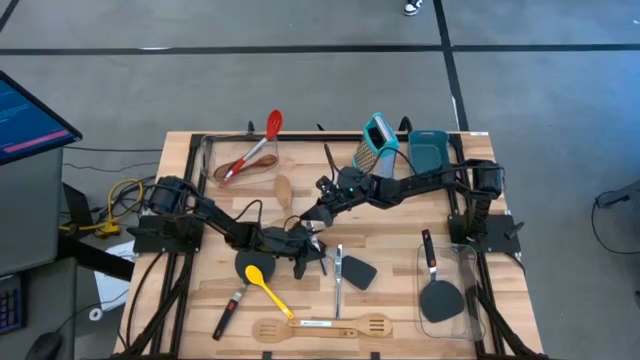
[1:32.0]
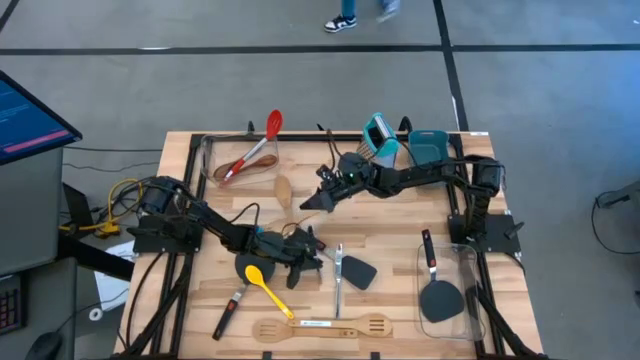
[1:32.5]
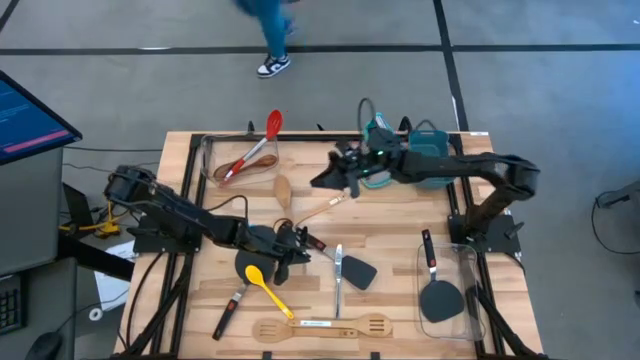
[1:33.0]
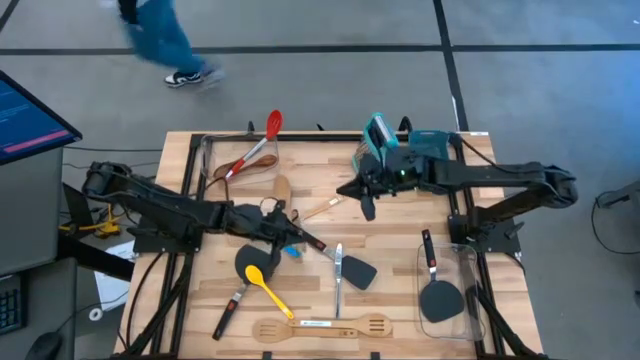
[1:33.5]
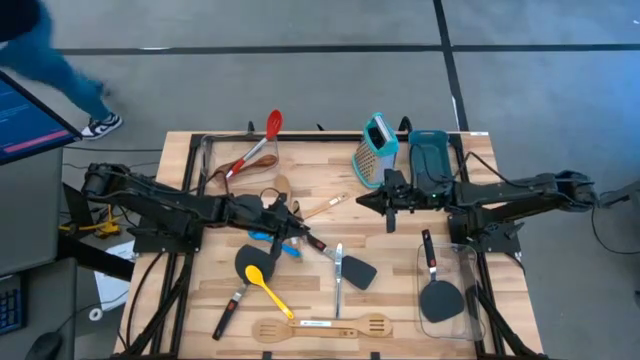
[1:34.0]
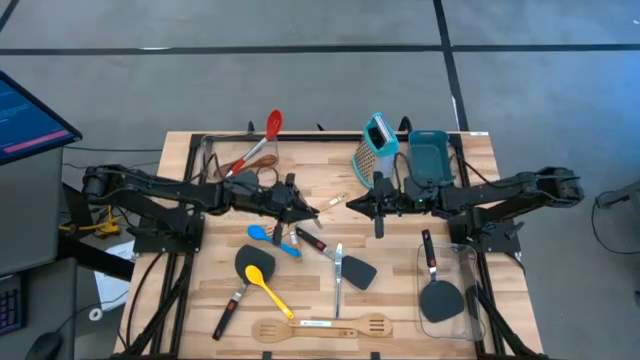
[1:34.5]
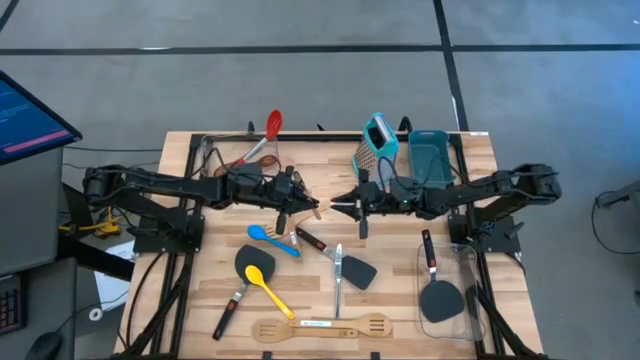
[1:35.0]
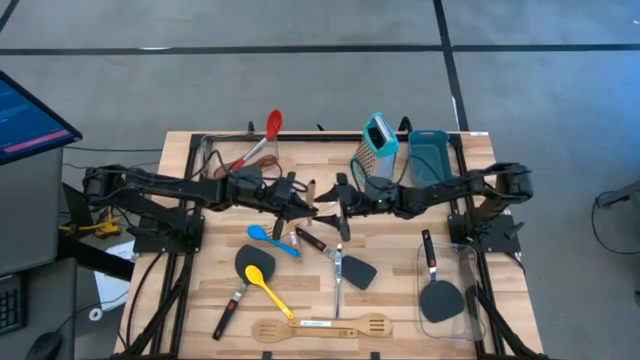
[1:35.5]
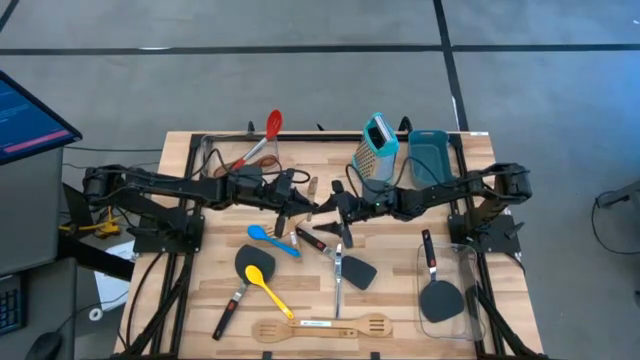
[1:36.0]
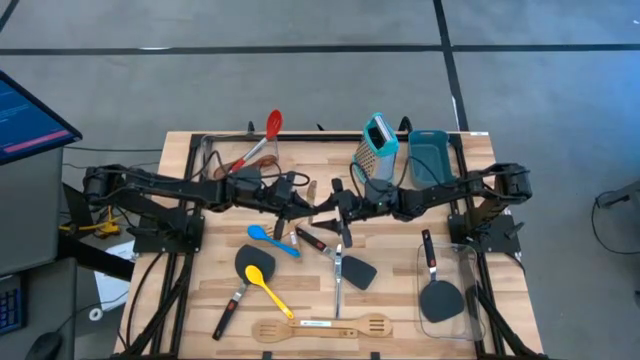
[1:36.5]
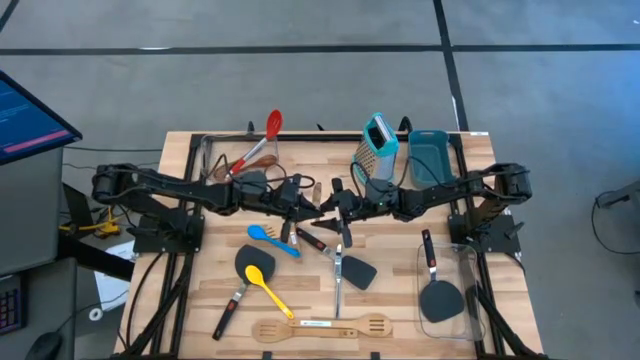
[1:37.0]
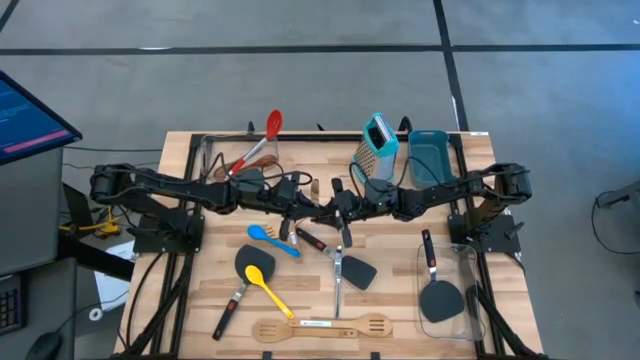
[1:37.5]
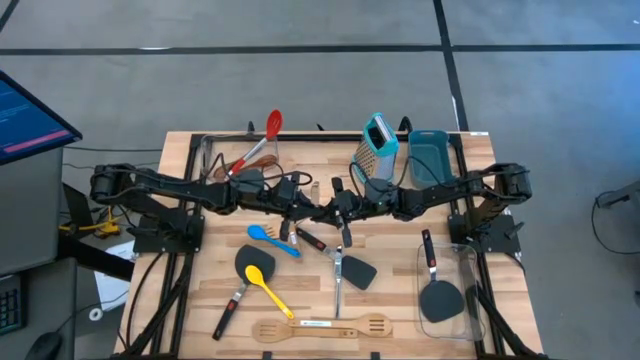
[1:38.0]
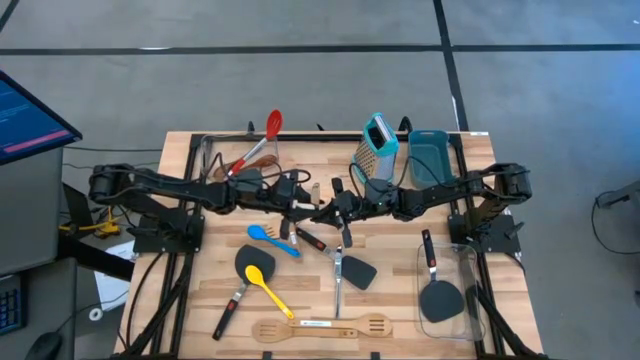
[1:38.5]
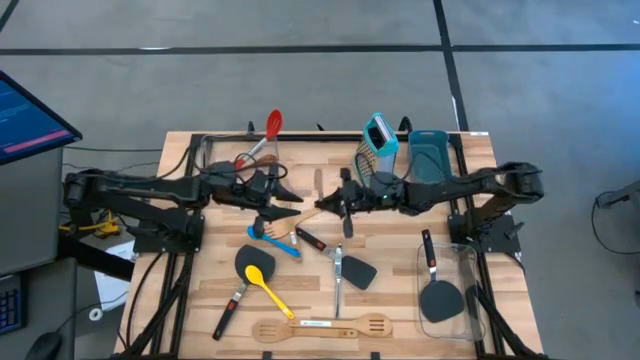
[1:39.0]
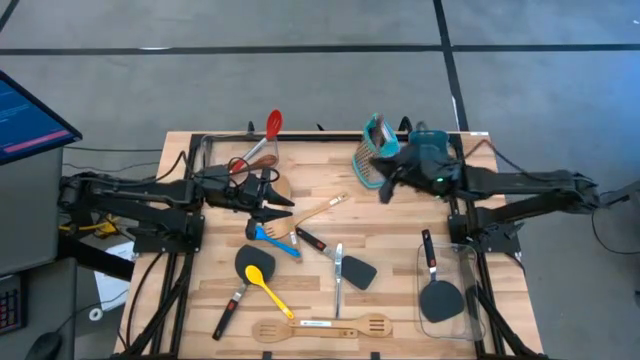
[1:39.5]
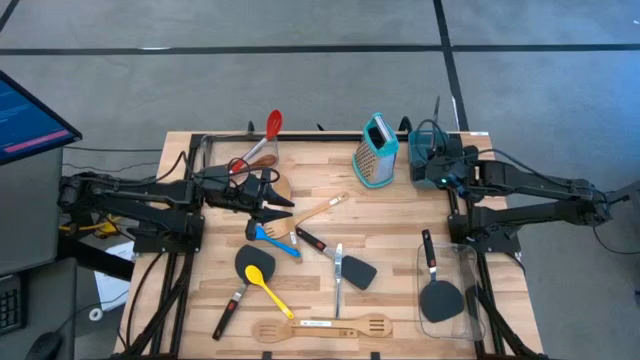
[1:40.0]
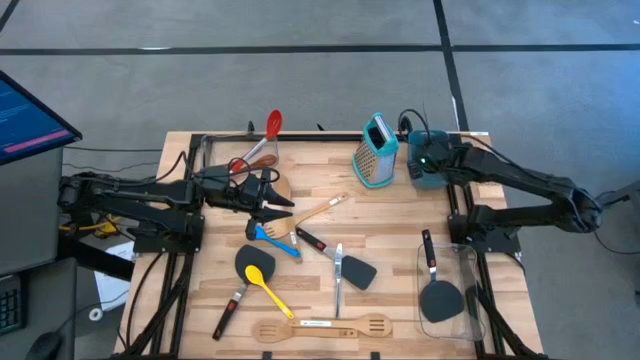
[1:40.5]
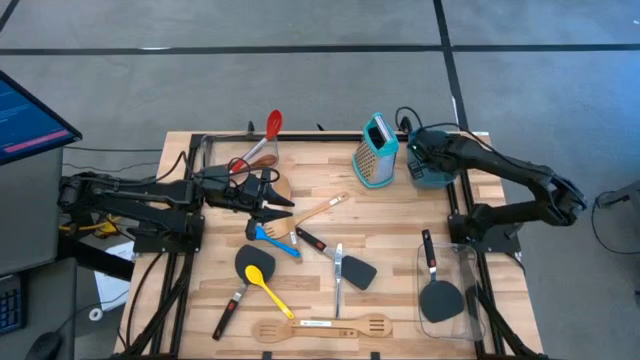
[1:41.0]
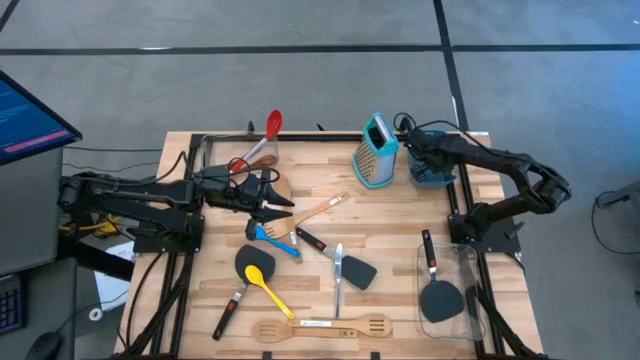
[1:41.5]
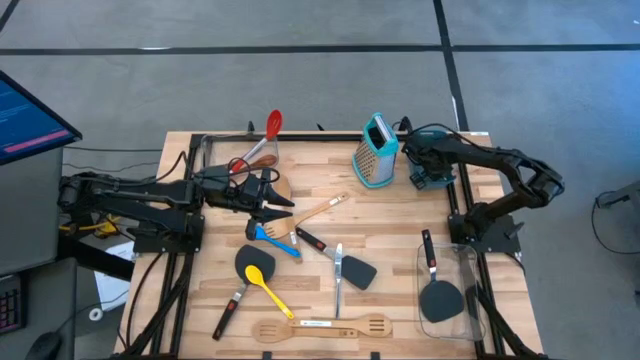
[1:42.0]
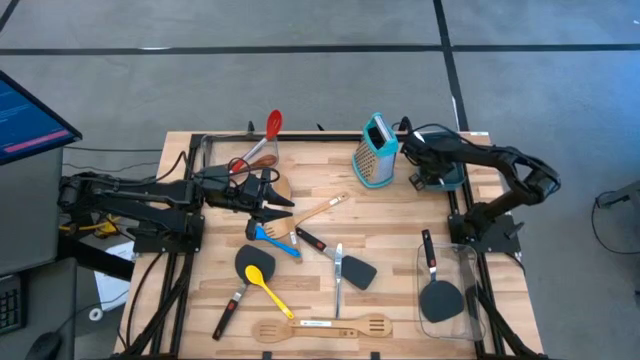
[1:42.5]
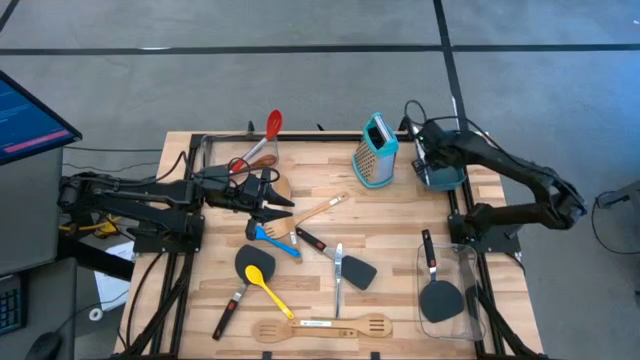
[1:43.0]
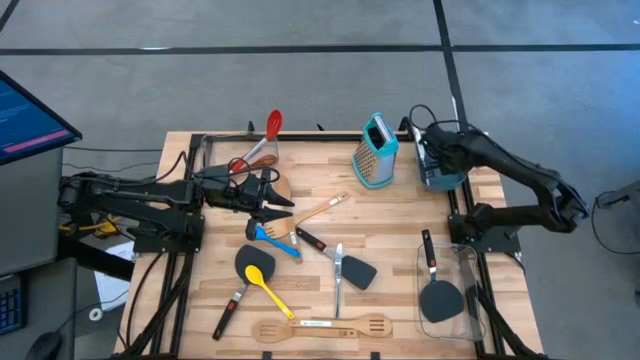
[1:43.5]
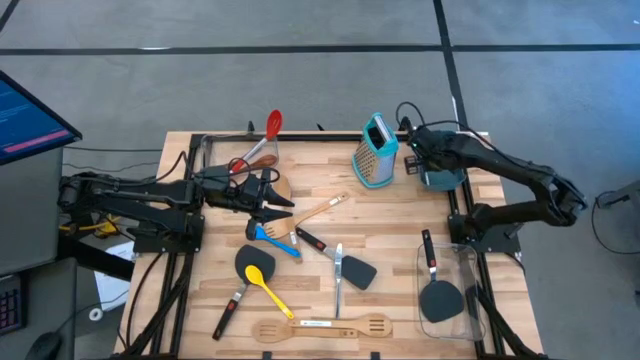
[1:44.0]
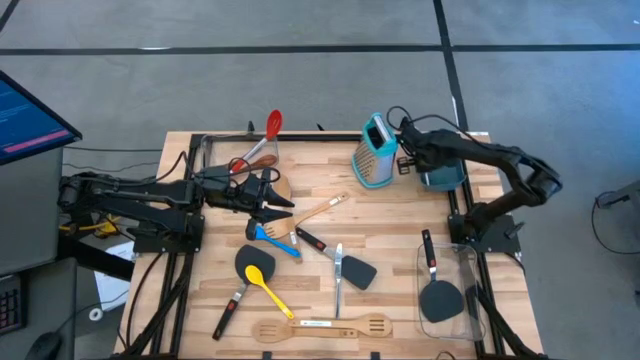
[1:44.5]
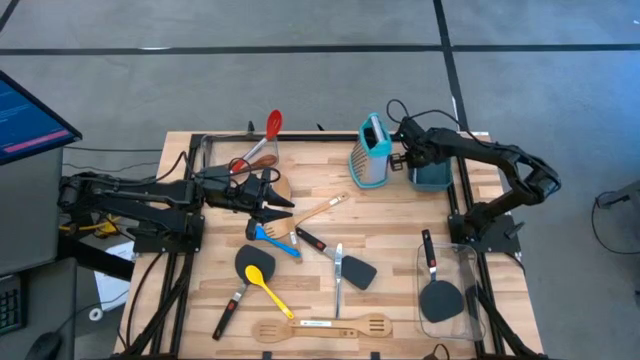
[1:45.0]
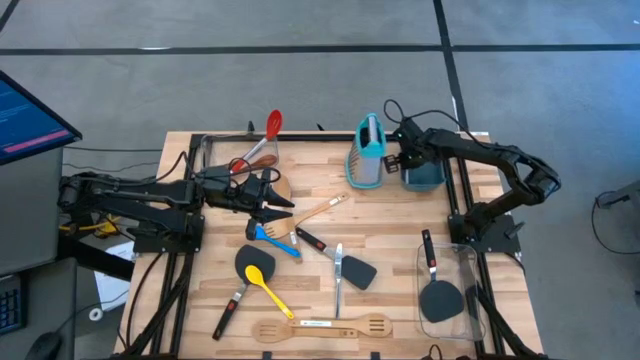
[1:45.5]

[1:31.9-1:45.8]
Task: Pick & Place Kitchen Items
Put the left silver knife into the green bin

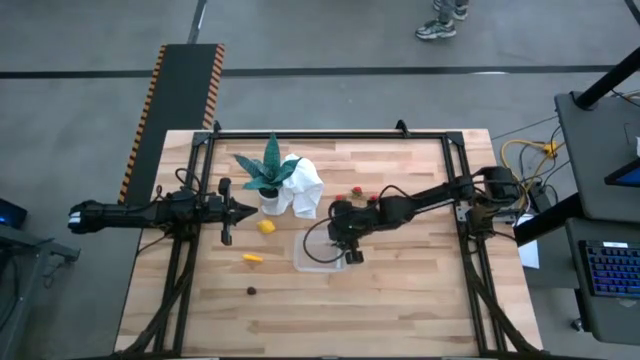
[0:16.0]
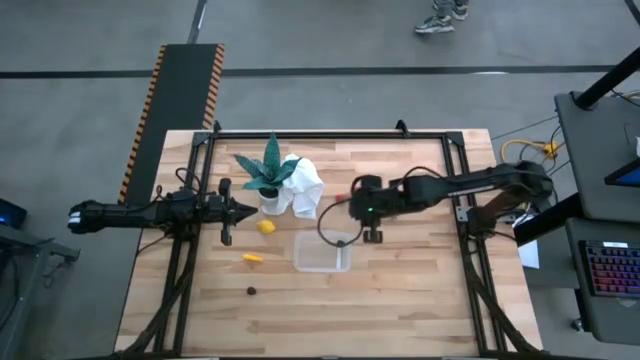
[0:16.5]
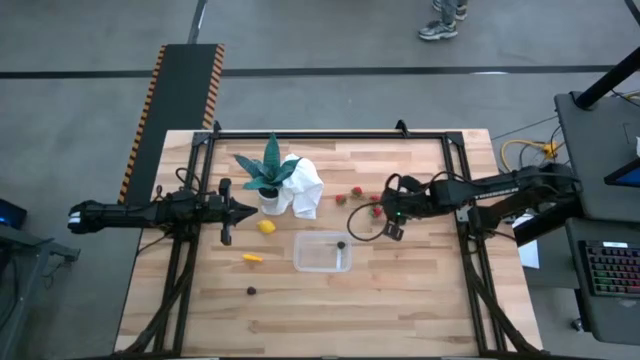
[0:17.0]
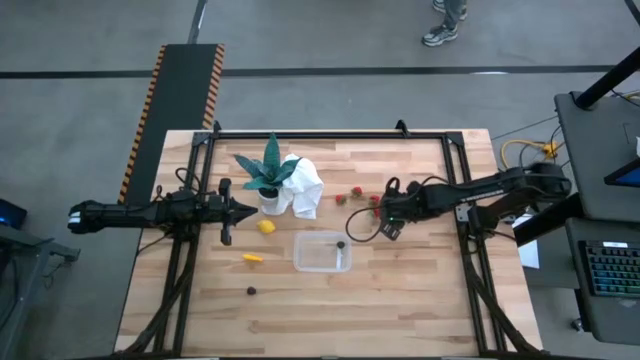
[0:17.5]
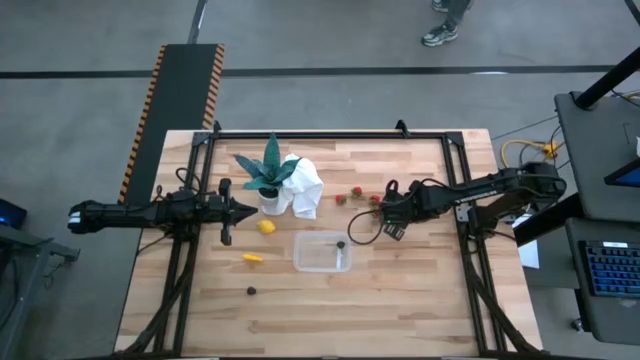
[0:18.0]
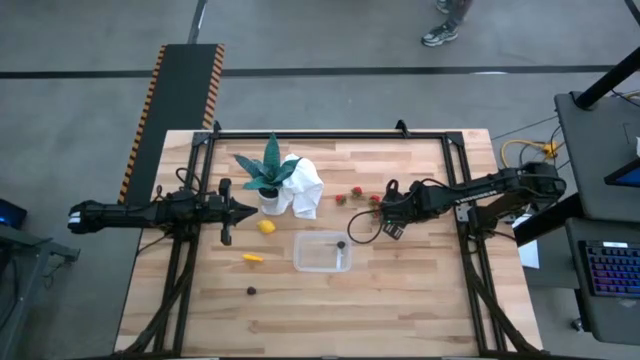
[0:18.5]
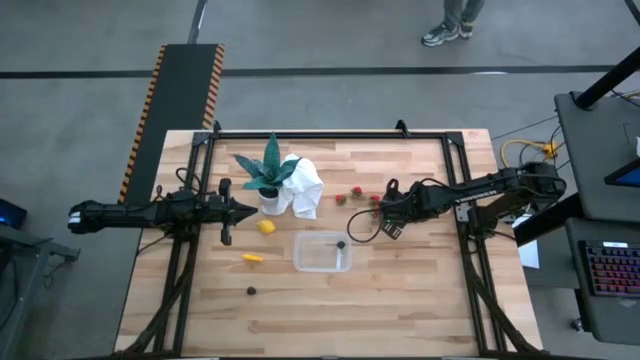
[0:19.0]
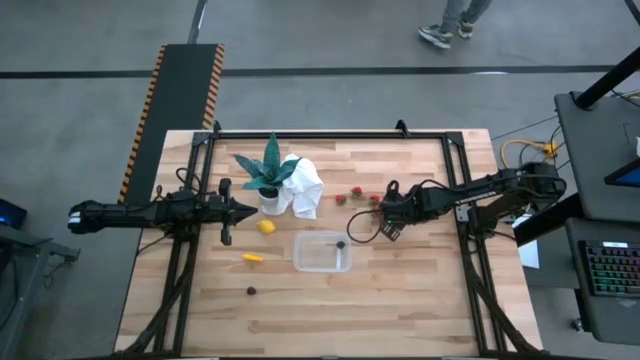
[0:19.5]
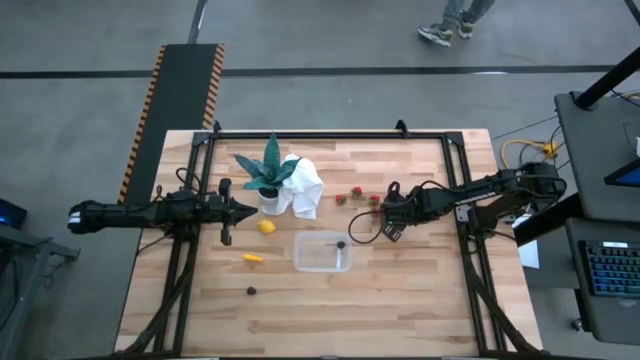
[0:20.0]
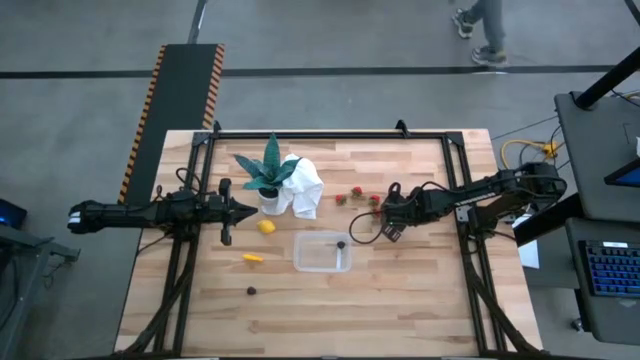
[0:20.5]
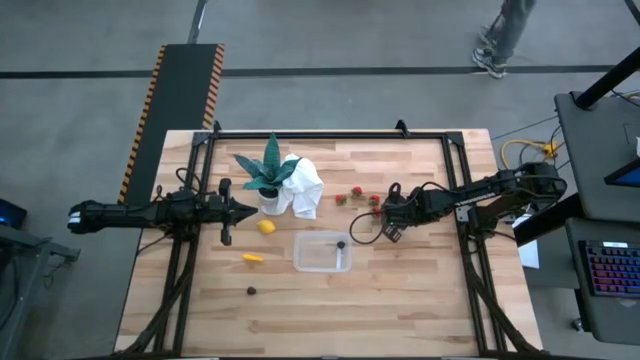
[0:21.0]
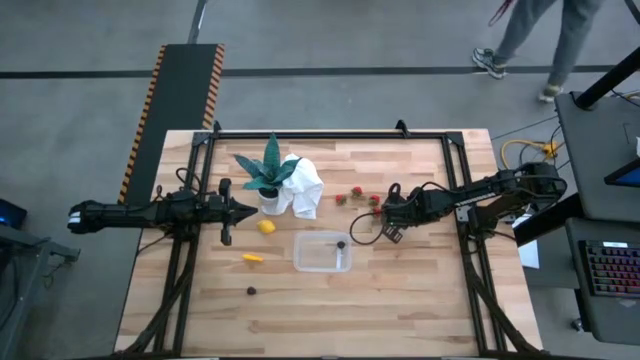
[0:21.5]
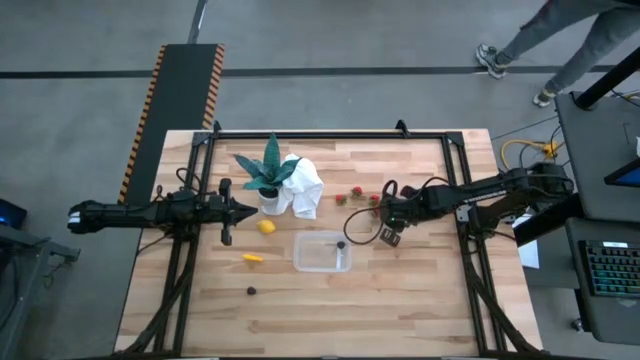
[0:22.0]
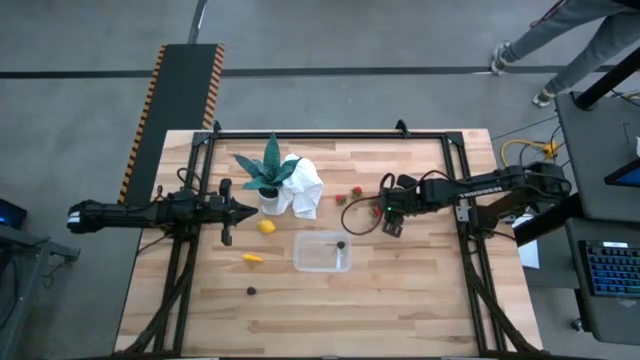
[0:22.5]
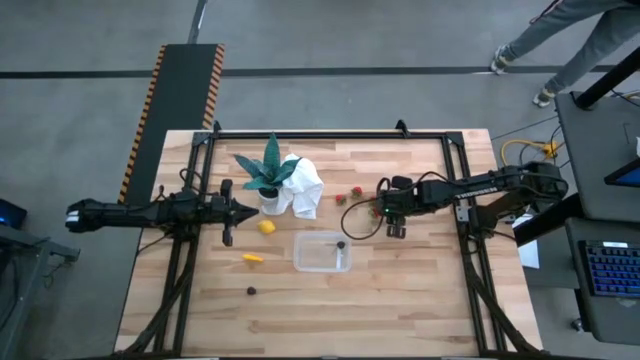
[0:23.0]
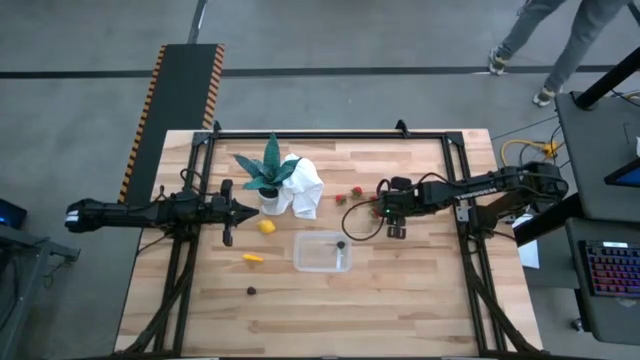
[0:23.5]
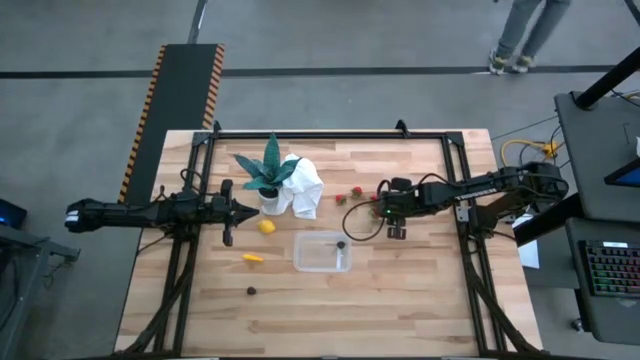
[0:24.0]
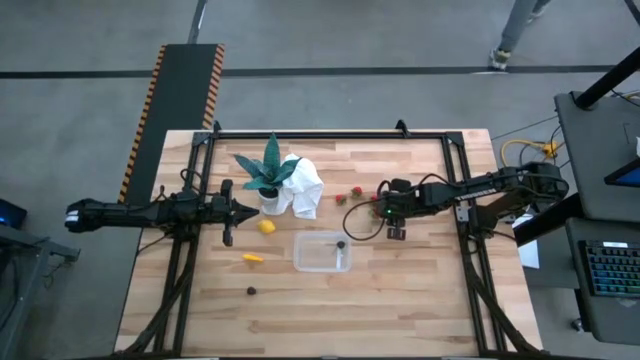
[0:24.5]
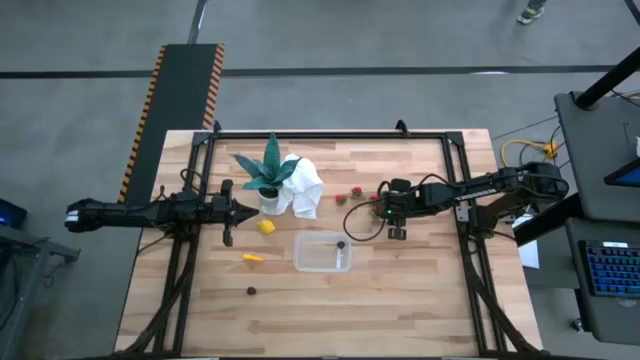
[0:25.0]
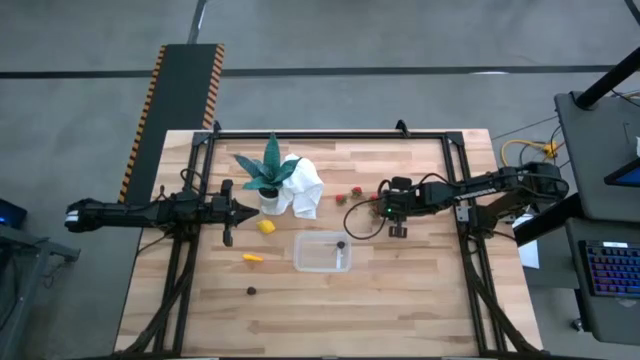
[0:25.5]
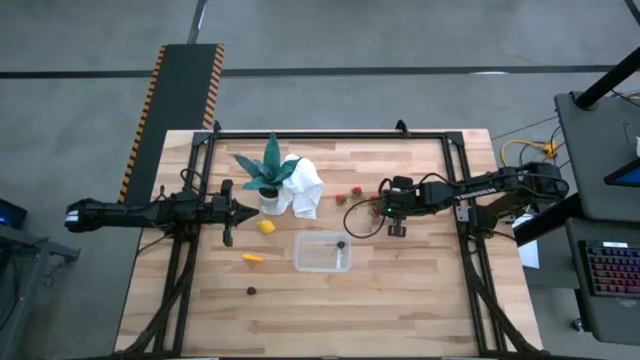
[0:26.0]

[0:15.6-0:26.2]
Task: Pick and placing Produce into tupperware
Put the strawberry into the bin
